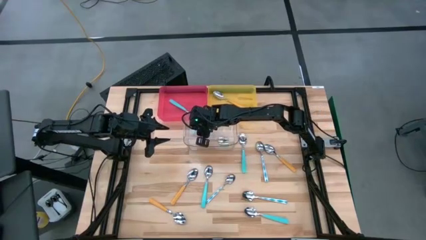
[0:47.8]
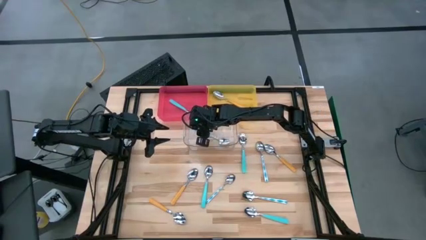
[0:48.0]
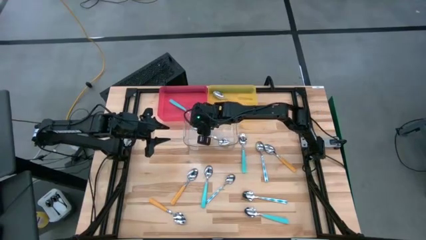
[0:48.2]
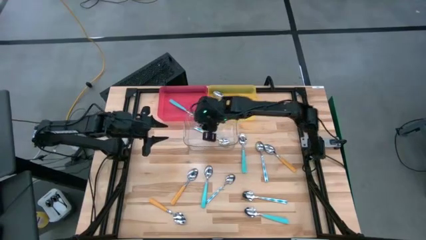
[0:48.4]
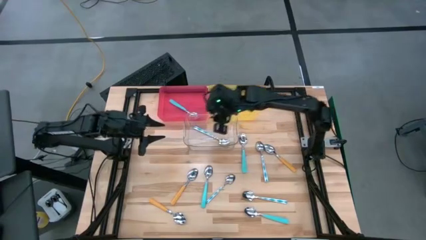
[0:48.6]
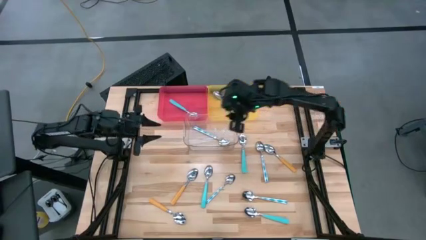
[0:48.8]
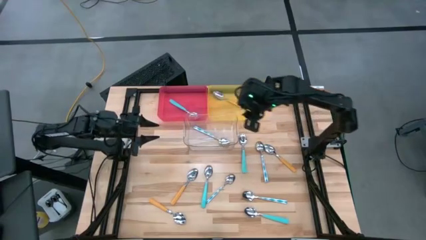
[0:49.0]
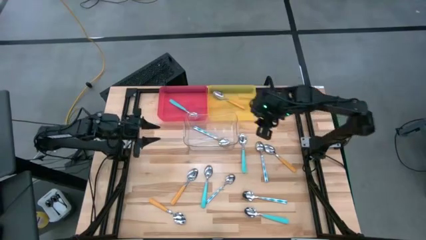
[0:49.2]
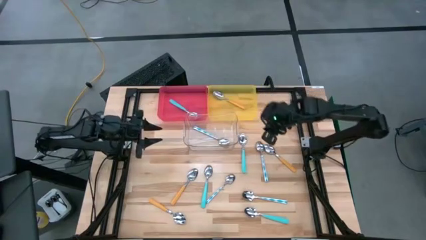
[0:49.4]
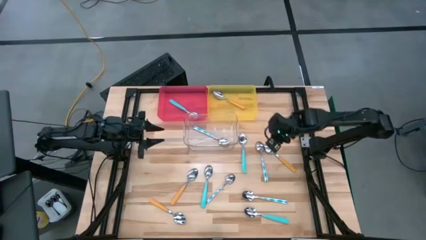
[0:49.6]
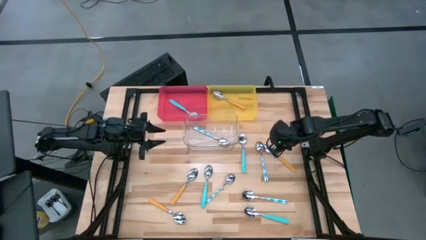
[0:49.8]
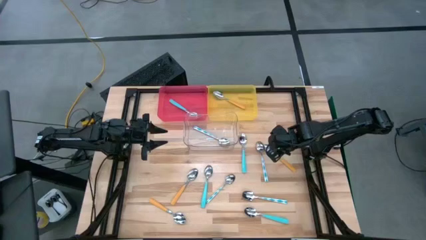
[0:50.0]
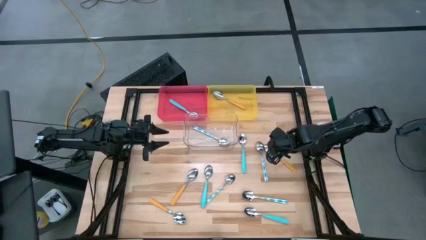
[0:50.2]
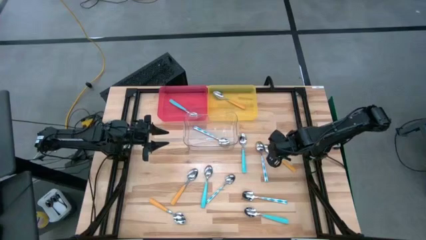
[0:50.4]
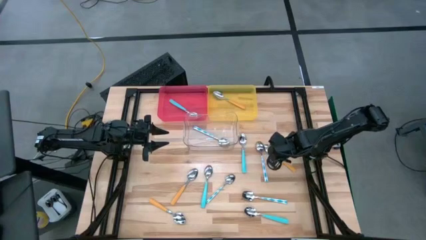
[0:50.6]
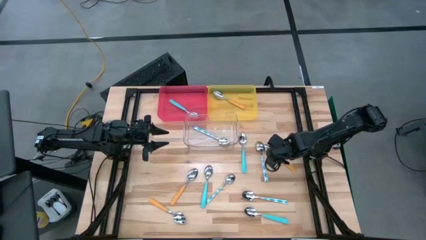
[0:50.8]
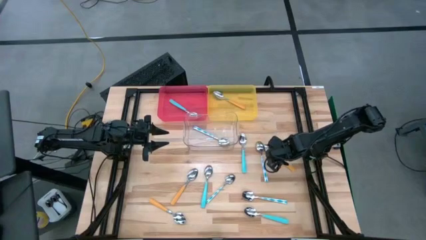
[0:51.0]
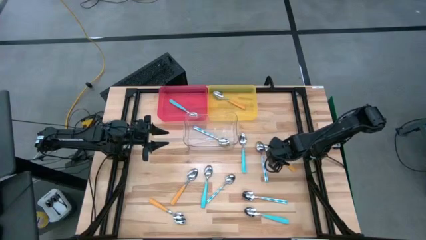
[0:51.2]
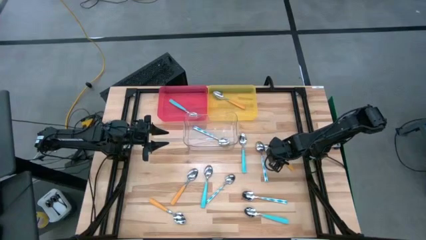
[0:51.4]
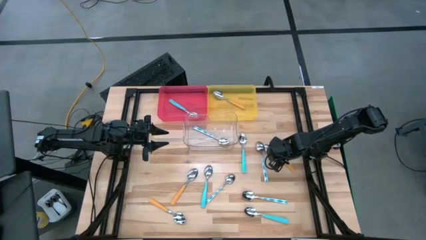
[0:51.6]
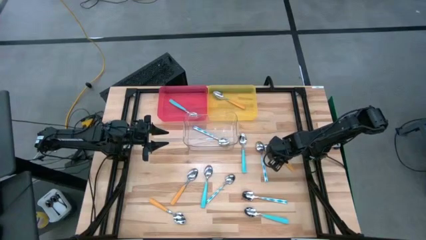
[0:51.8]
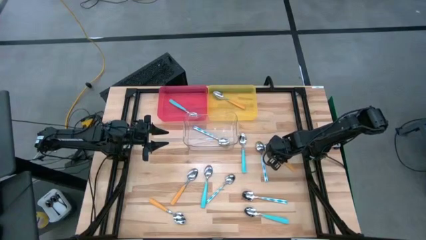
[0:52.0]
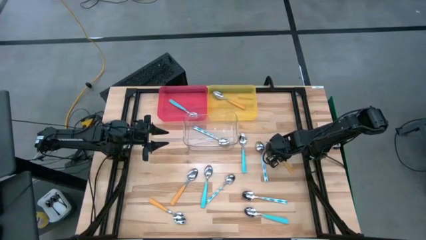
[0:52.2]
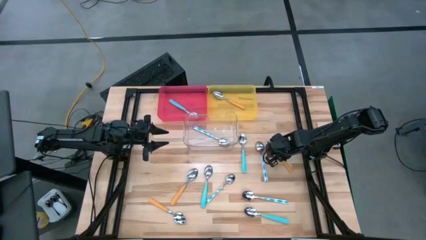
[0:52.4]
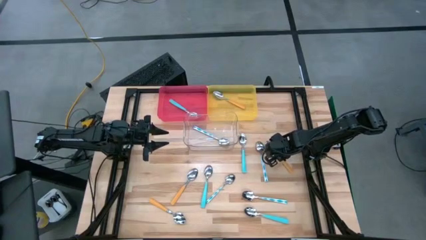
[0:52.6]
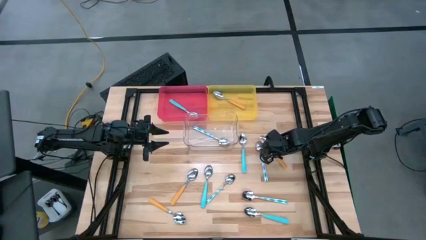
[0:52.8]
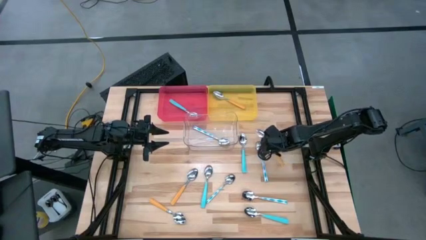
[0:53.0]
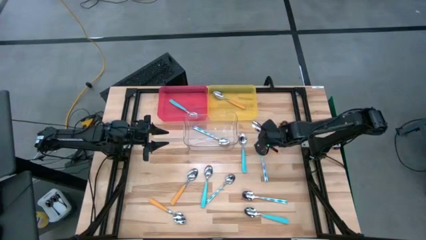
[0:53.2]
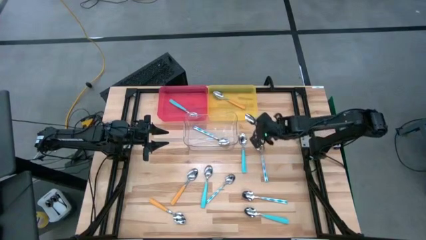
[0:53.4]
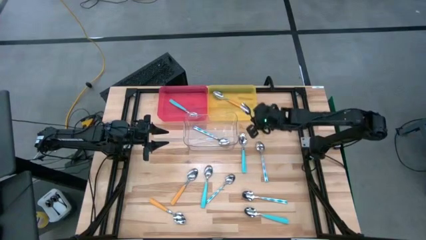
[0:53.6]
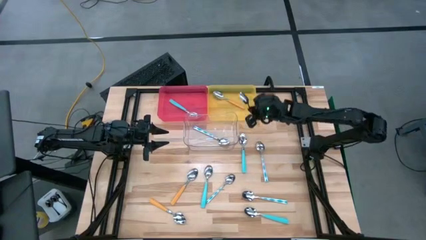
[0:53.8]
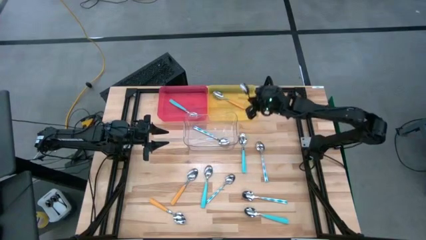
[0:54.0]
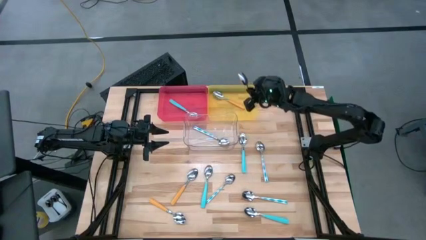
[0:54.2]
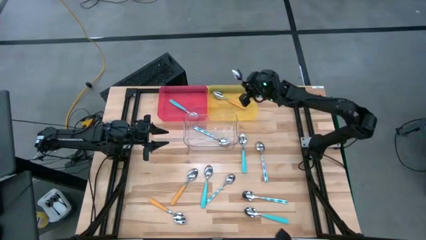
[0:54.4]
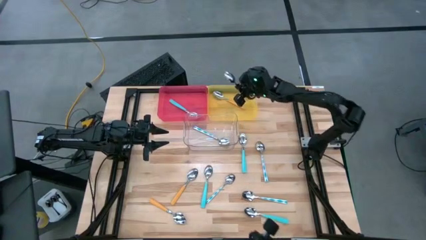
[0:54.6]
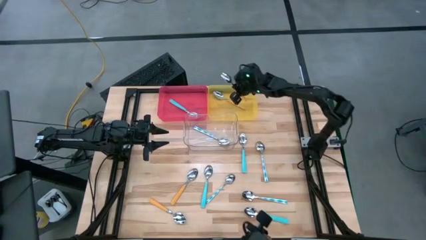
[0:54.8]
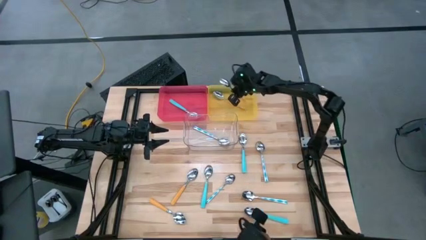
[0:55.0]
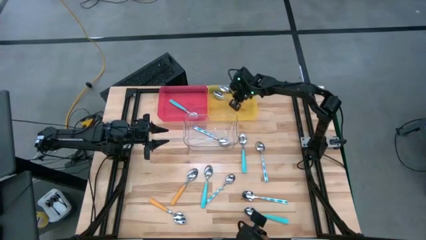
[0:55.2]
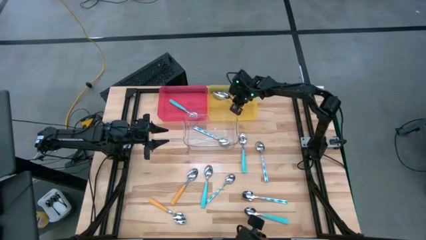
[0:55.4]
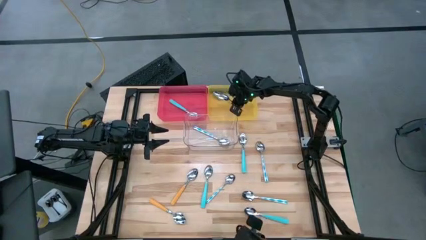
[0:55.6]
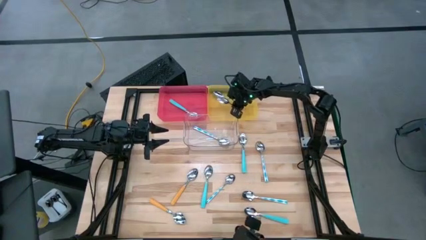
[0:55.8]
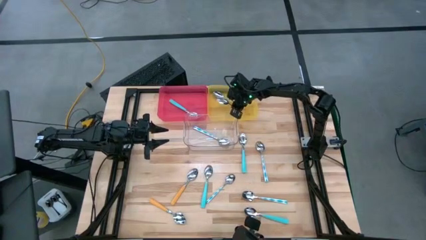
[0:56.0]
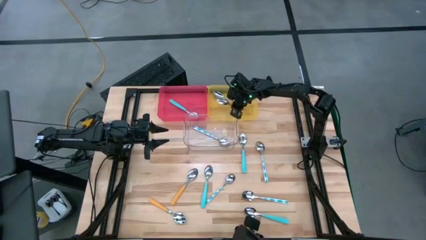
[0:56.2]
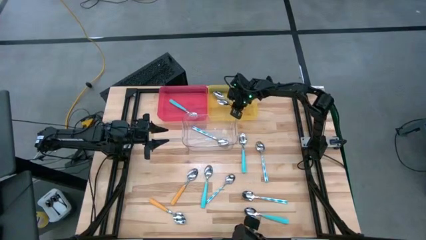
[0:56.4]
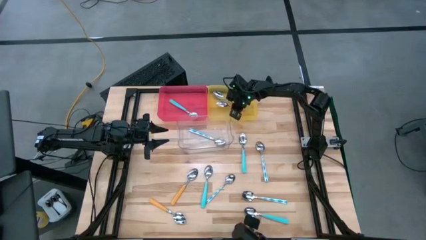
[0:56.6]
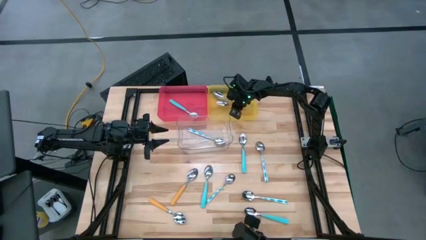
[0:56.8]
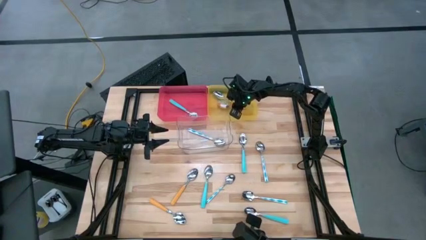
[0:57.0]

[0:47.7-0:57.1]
Task: Sort silverware by color (type)
Put the yellow spoon into the yellow bin

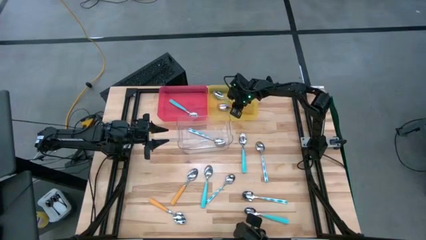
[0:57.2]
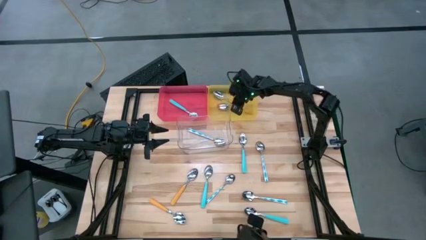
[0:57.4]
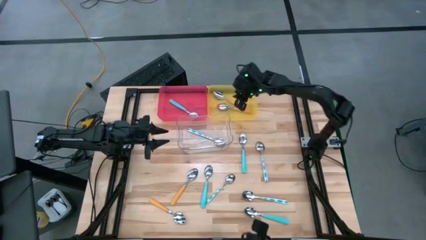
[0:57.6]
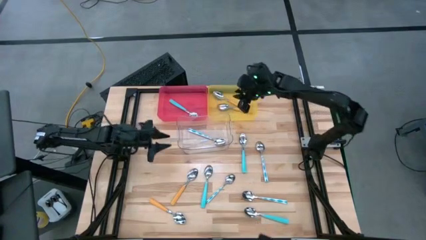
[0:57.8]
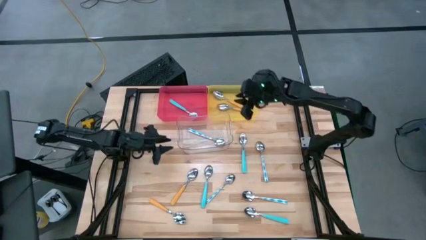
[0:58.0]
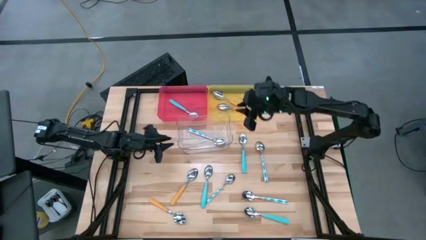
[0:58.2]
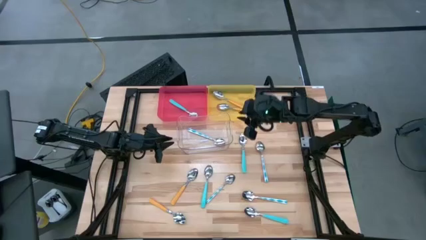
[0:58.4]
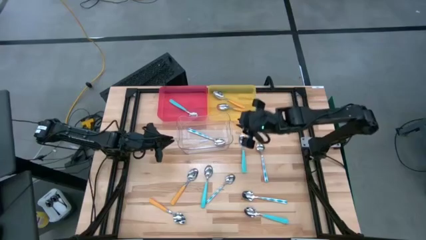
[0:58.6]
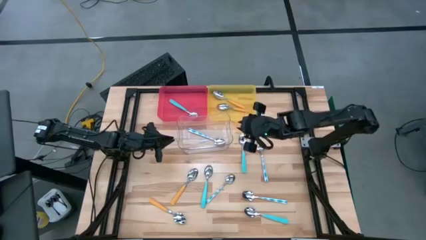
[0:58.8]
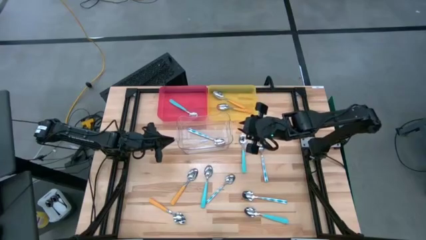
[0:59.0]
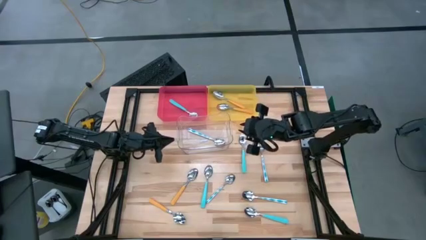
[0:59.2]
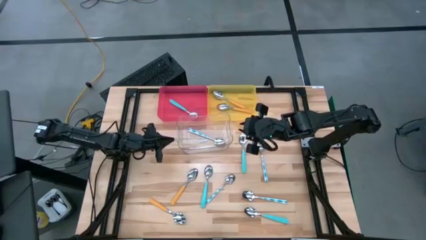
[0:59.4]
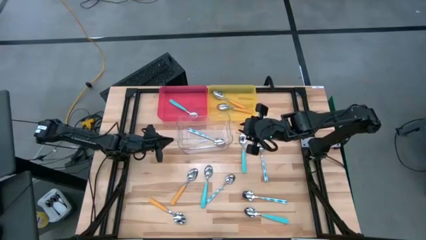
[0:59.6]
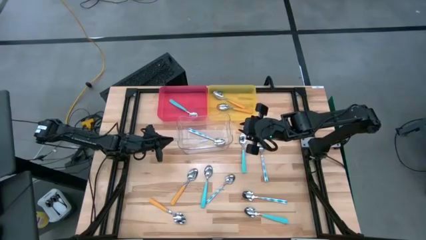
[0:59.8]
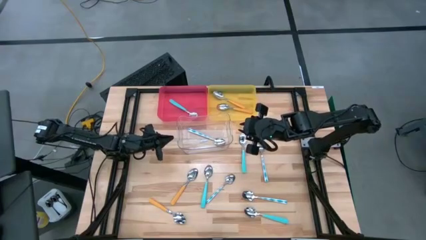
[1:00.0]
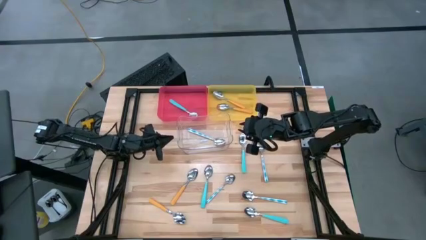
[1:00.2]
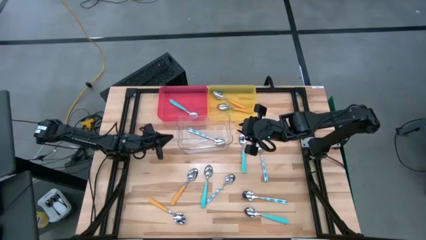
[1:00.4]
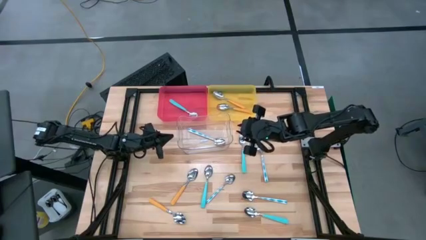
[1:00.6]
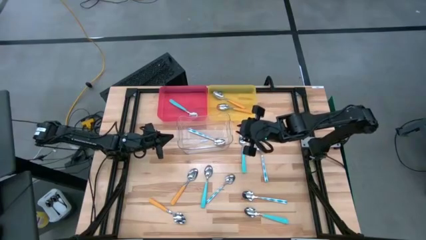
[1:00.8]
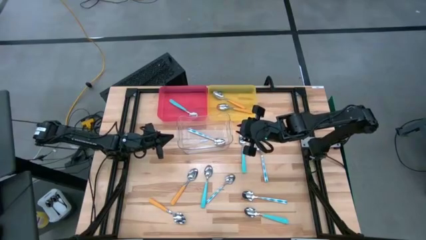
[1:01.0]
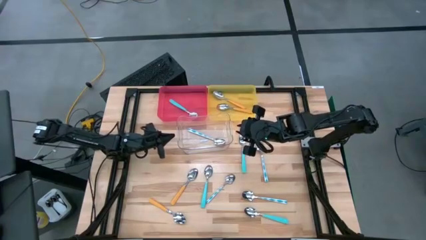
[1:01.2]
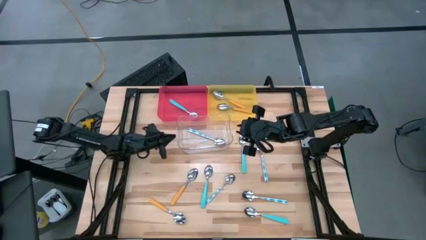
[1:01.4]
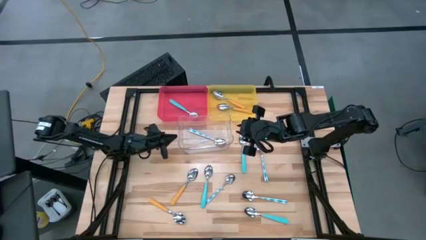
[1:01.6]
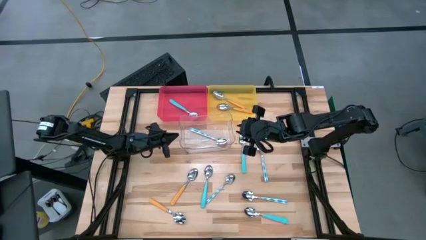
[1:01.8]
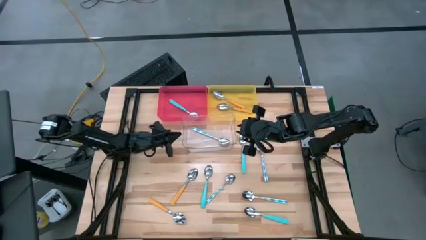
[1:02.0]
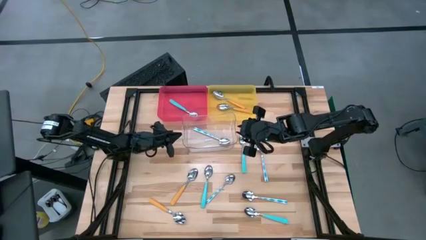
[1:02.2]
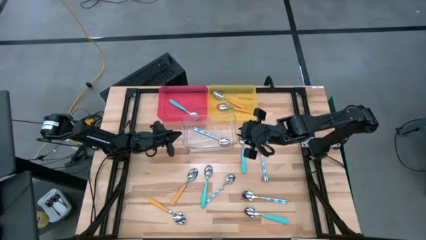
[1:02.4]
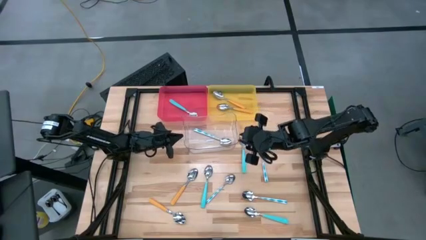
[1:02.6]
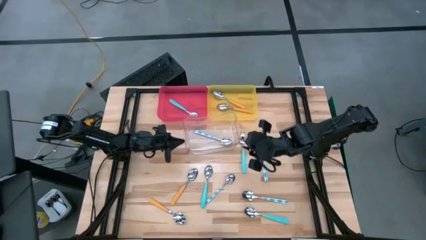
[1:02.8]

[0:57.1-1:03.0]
Adjust the transparent bin
